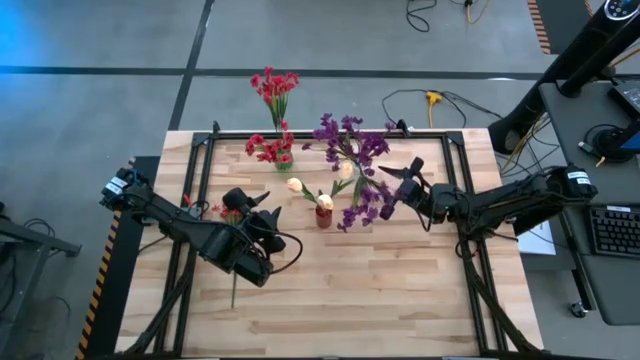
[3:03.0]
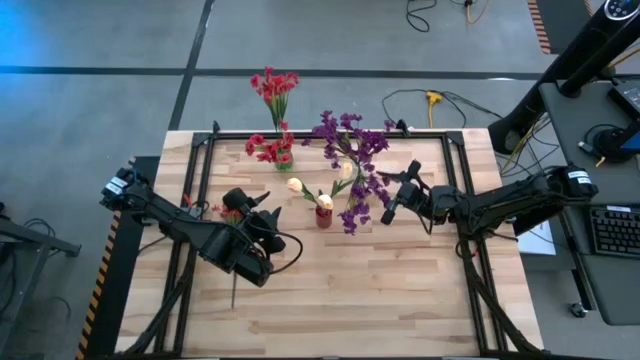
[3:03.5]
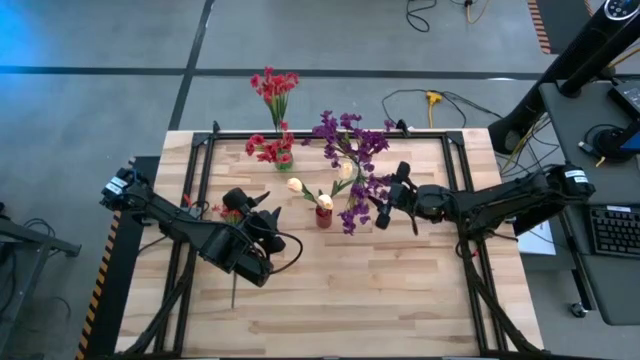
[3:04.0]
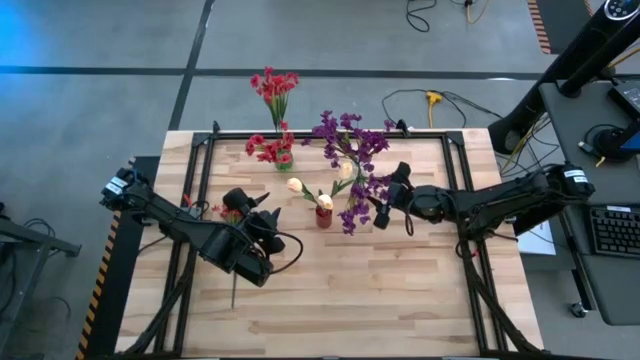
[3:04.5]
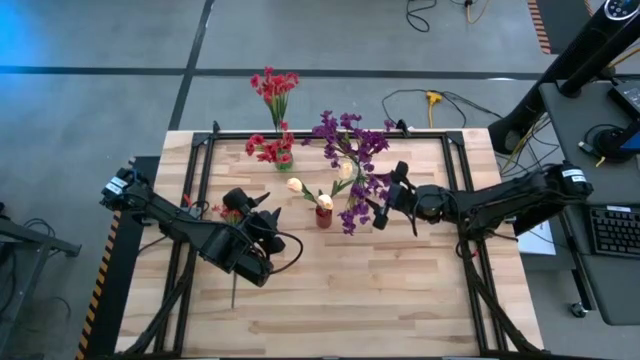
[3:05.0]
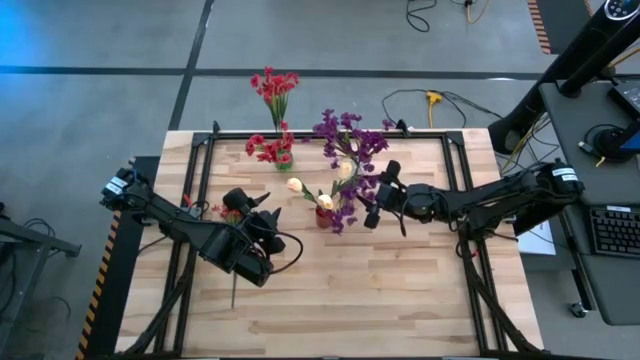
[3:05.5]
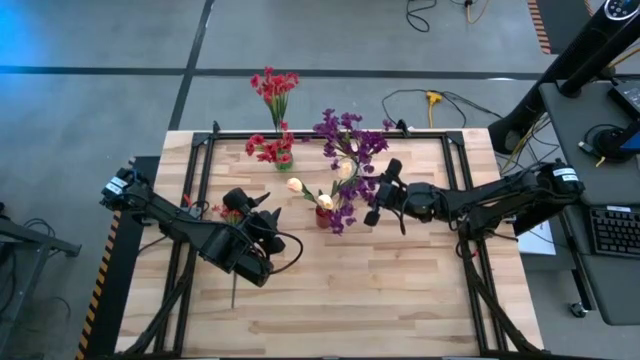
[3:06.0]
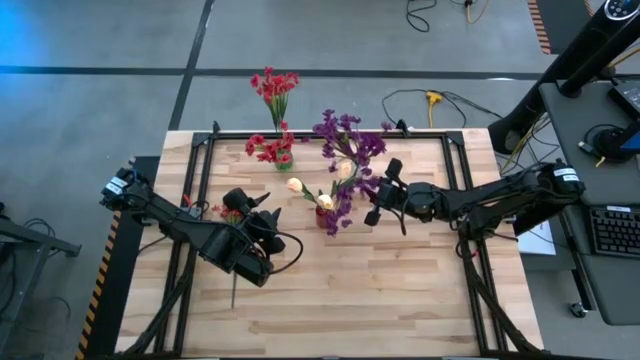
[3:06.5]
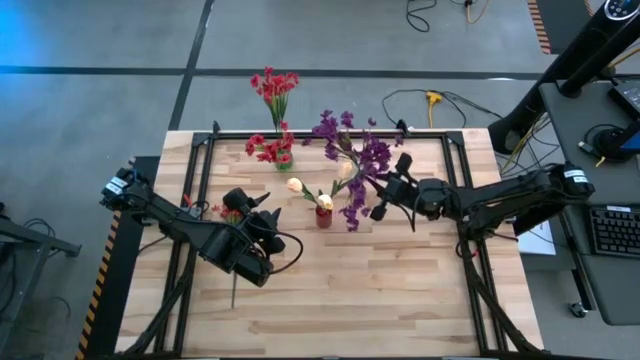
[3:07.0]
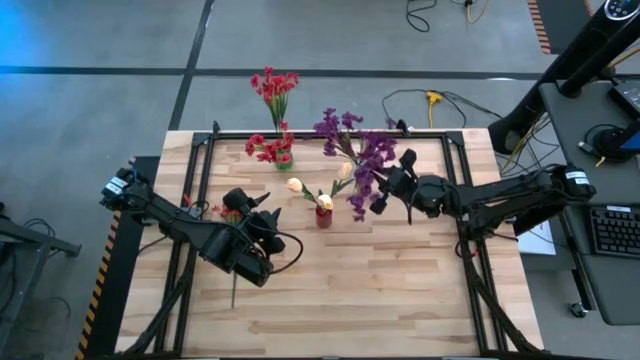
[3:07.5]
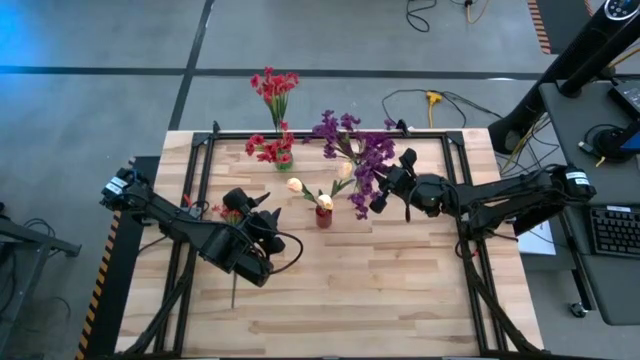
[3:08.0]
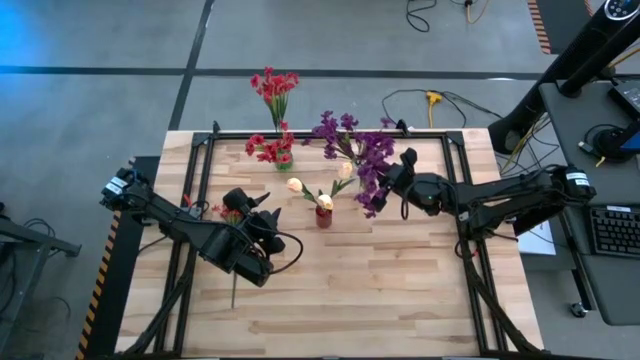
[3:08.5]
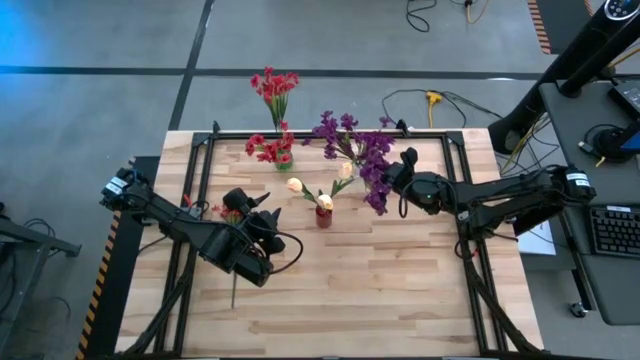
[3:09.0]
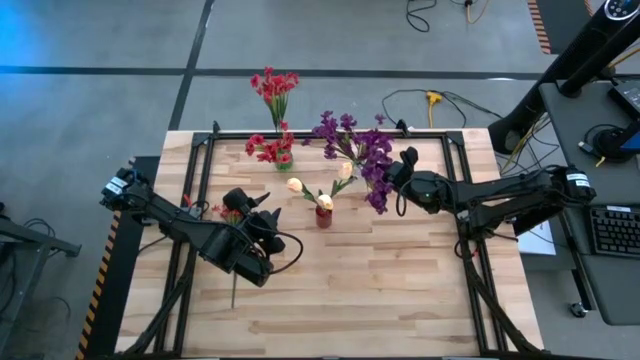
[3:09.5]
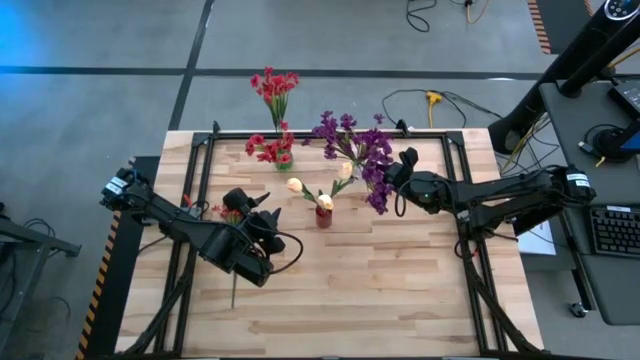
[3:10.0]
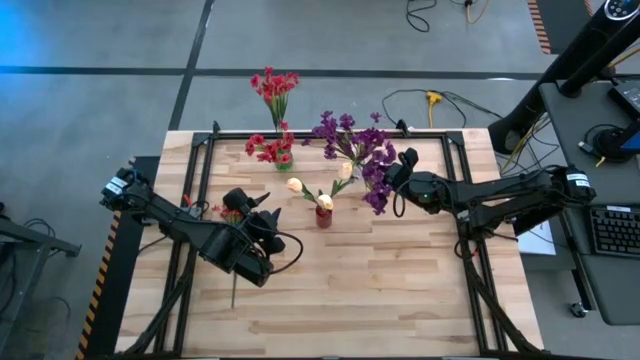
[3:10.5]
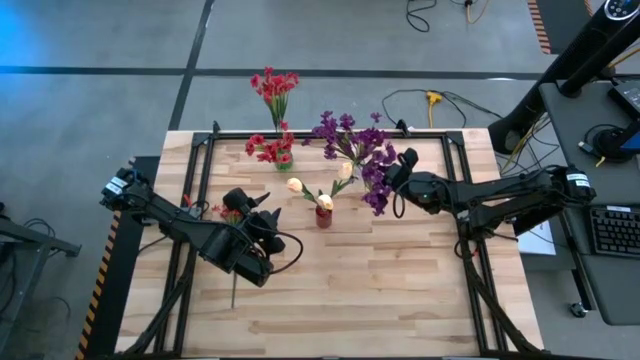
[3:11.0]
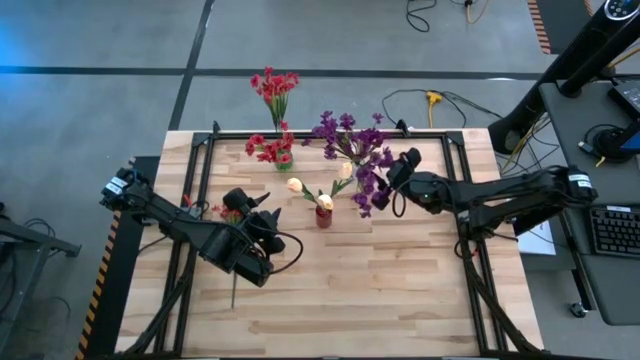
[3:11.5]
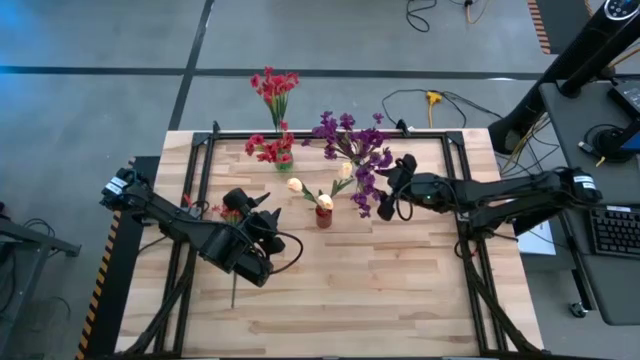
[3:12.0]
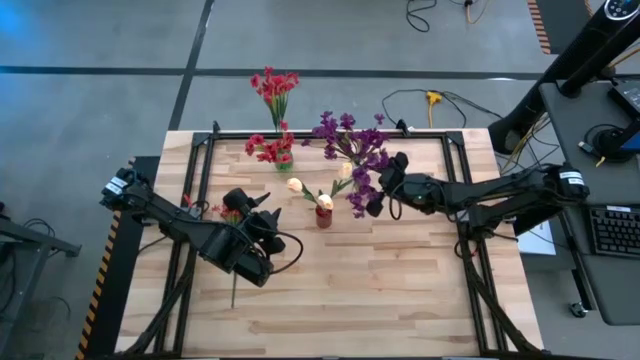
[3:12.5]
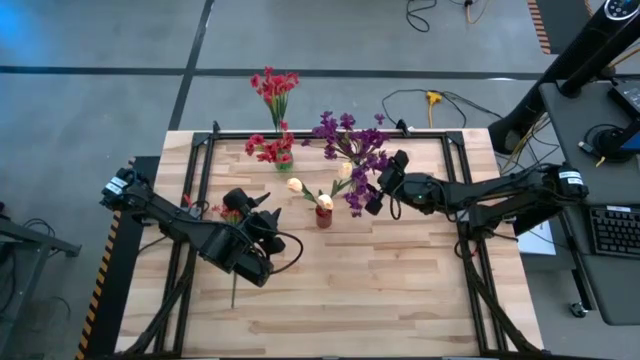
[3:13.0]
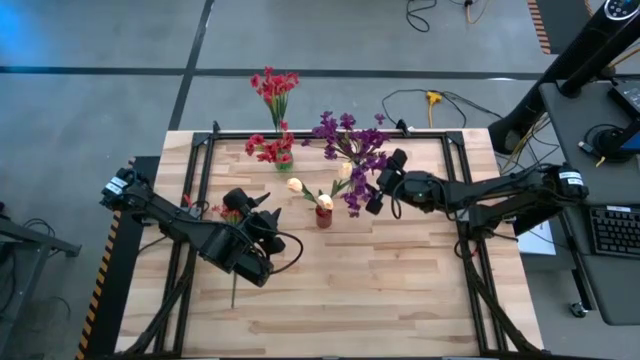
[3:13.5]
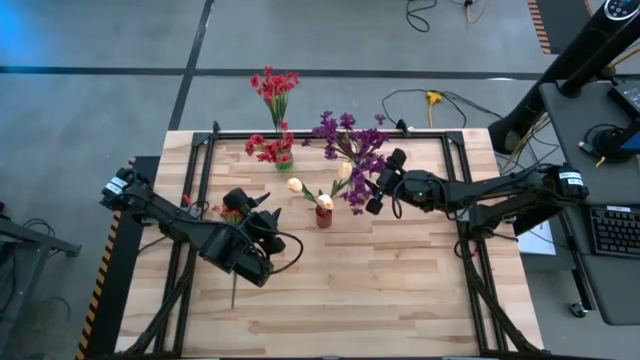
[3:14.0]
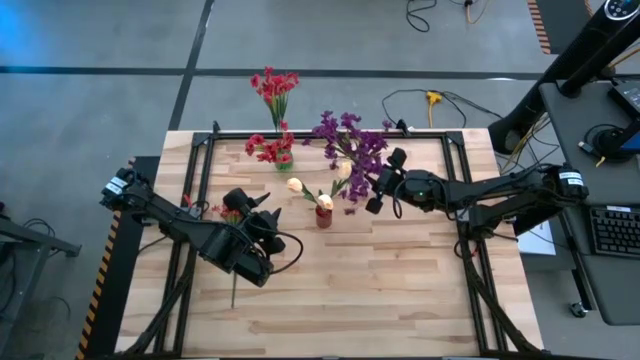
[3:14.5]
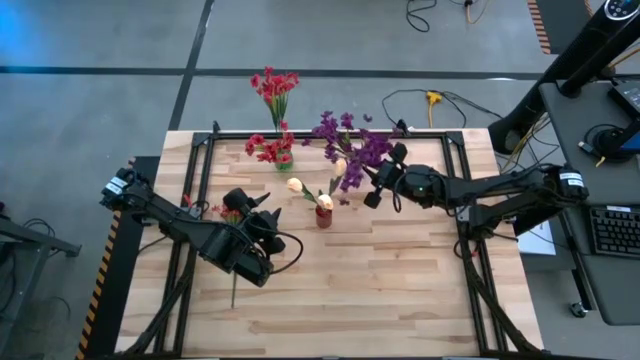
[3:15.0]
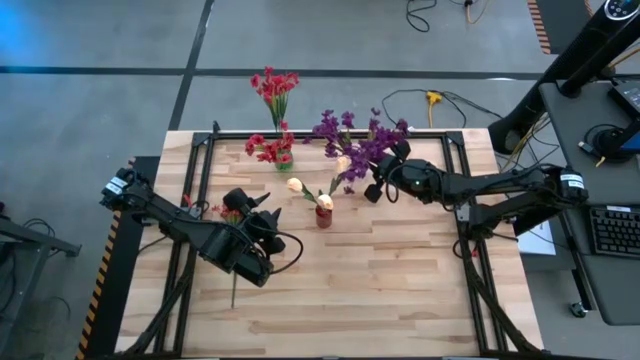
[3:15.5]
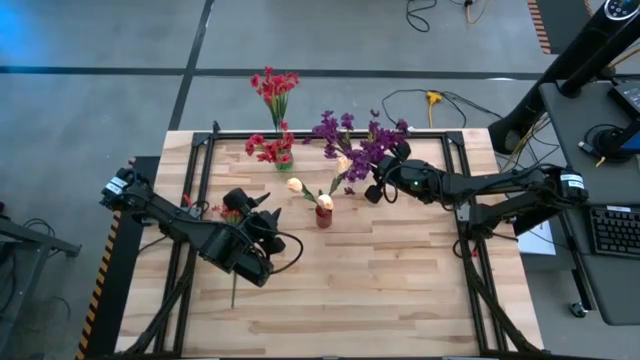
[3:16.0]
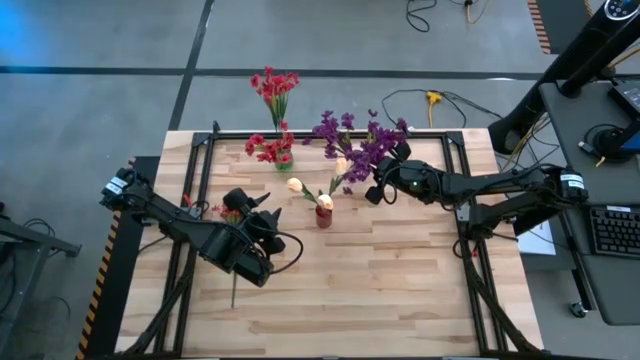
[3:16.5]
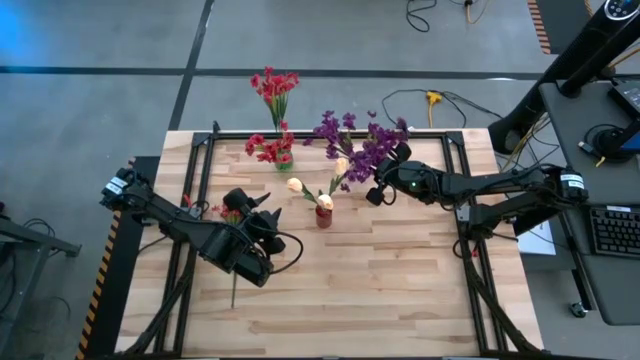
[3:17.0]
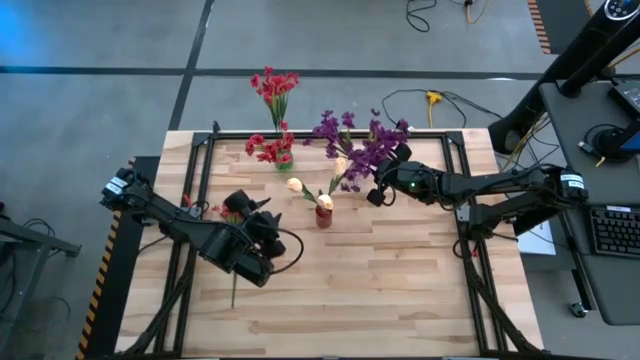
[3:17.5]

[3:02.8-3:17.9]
Task: Sort flowers into vase by color
Put the purple flowers into the transparent vase

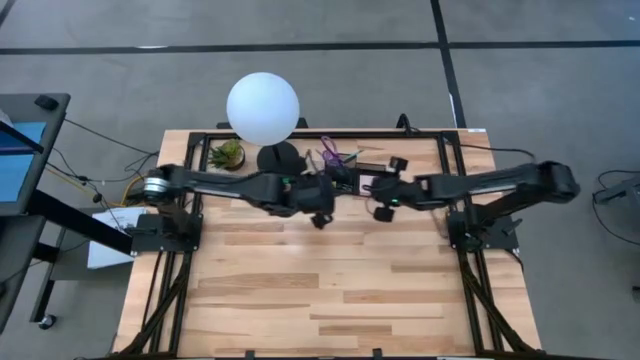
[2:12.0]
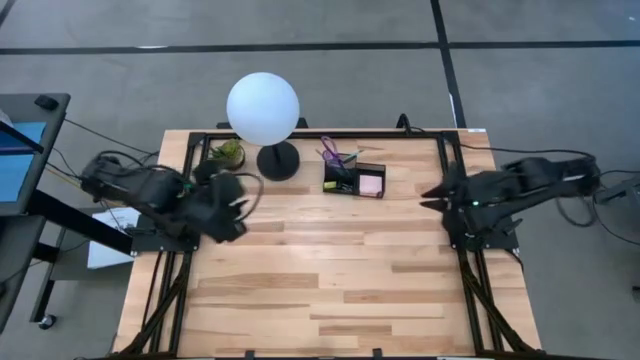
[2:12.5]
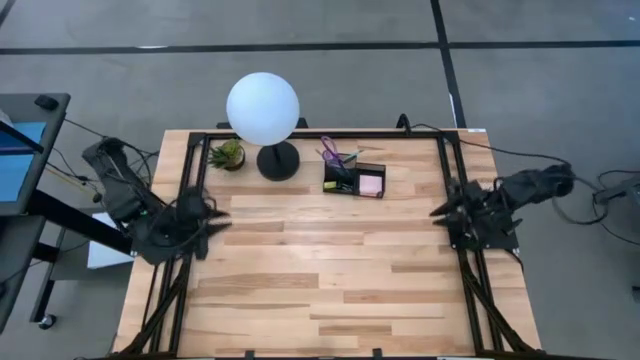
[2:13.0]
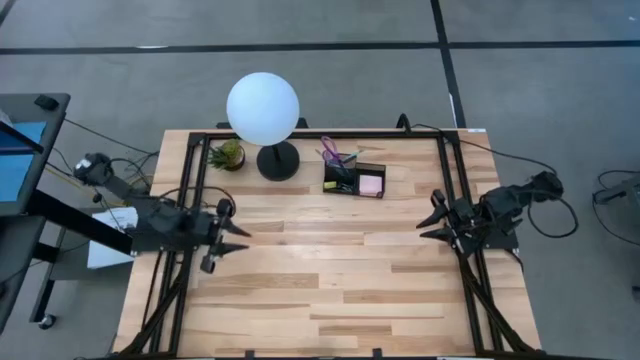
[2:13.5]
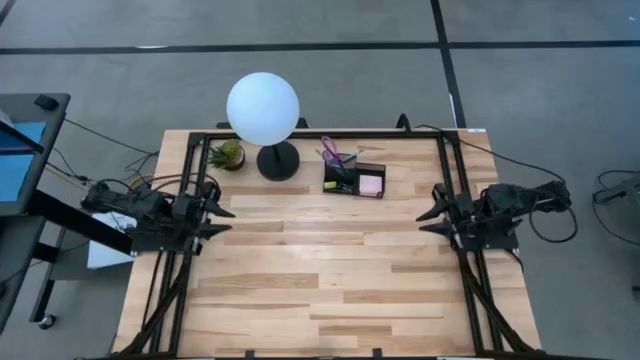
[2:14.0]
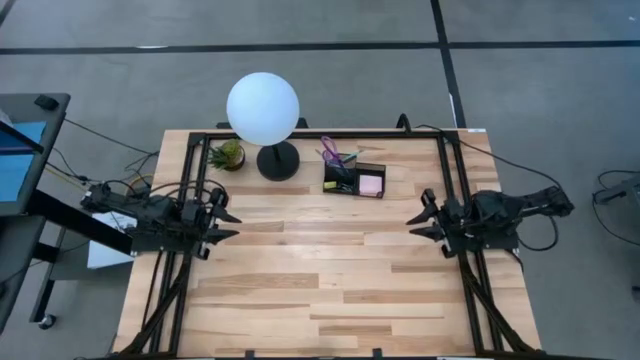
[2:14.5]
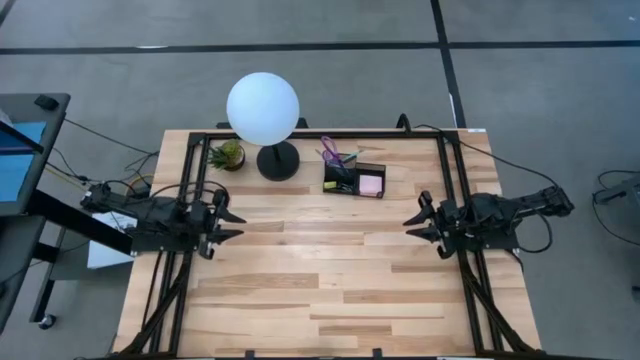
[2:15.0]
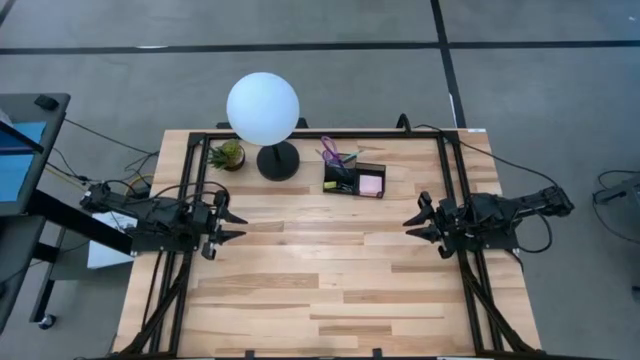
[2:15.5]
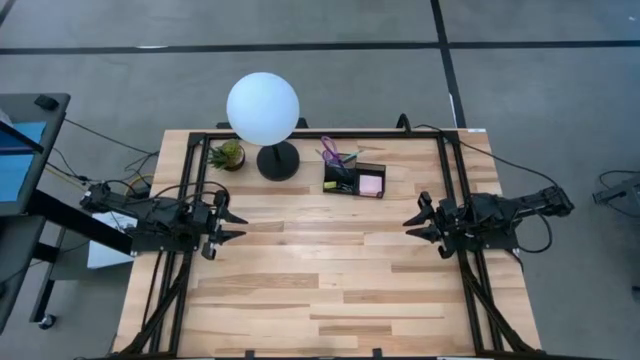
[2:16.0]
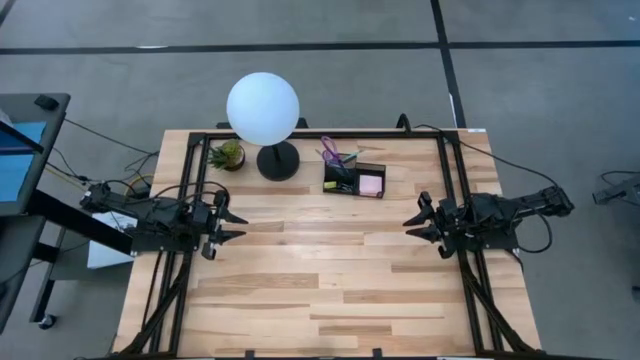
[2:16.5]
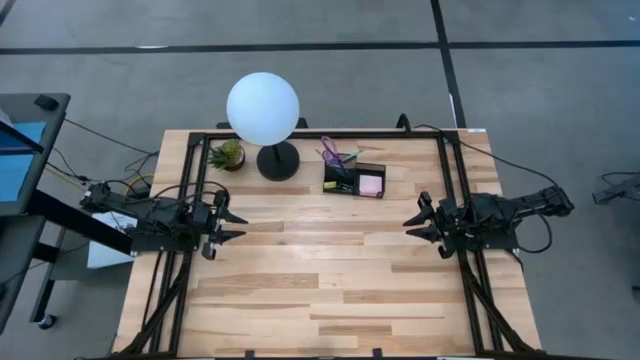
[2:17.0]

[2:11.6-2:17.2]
Task: Pick and place office supplies into organizer
Return to Home Position

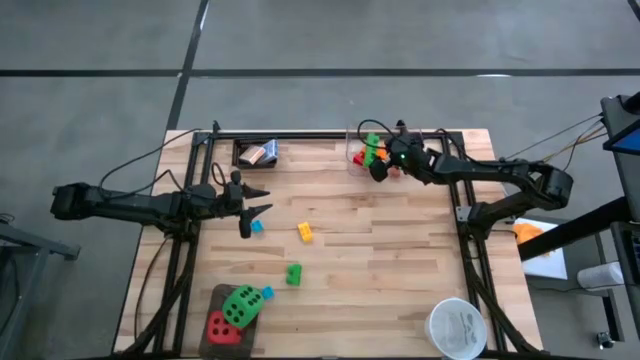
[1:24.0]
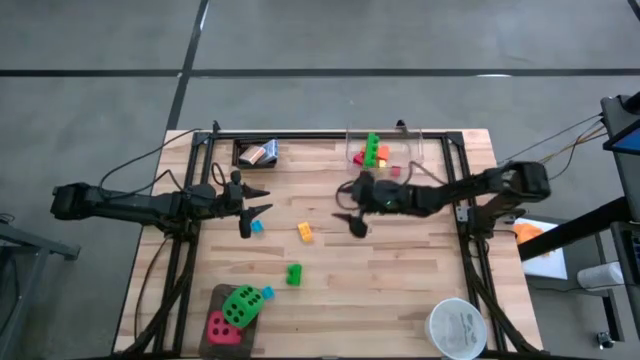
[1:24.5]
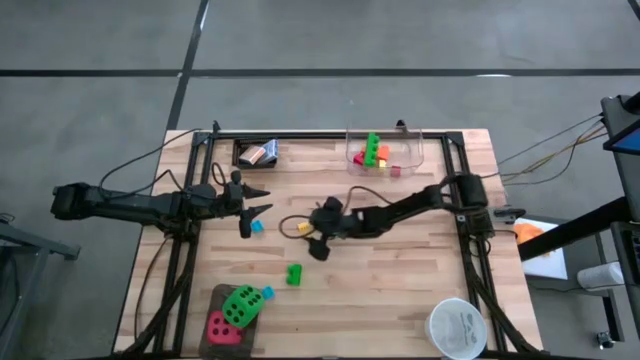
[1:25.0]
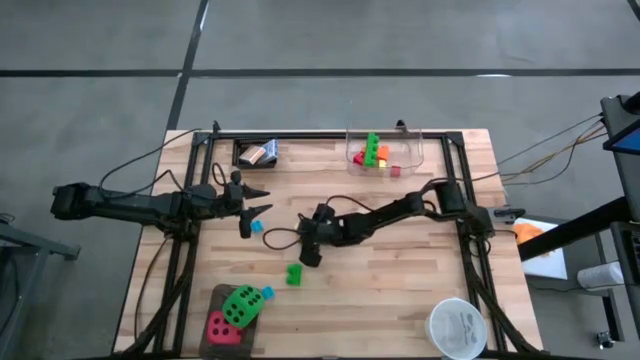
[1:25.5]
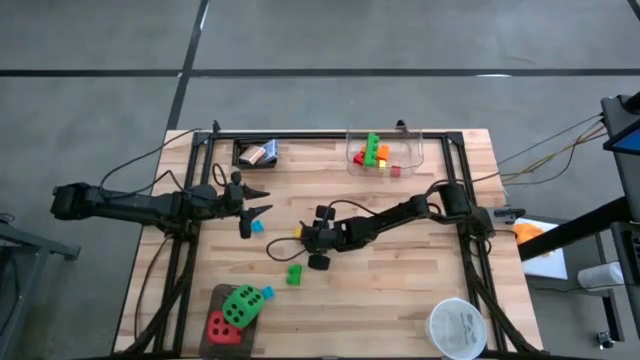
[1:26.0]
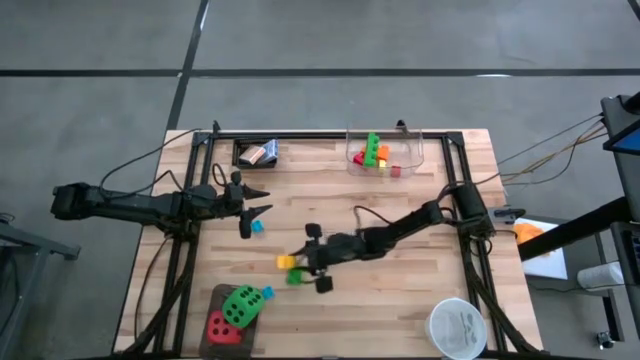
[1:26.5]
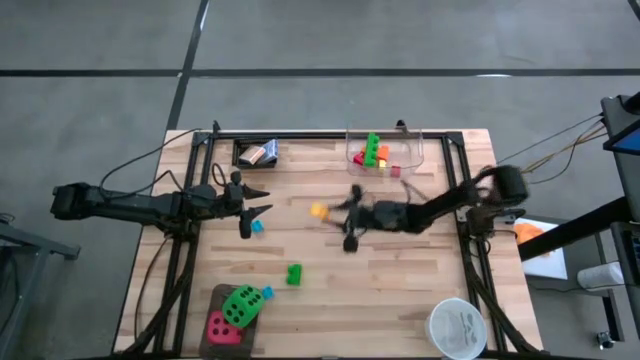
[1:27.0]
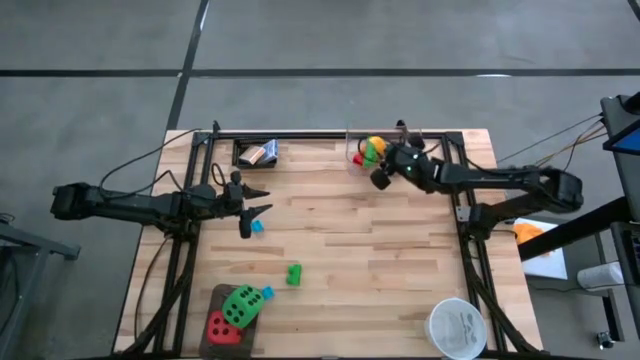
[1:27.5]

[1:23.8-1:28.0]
Task: Pick & Place Toys
Put the yellow game piece into the transparent bin
